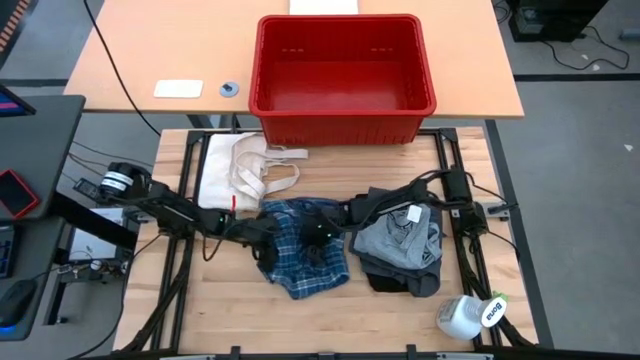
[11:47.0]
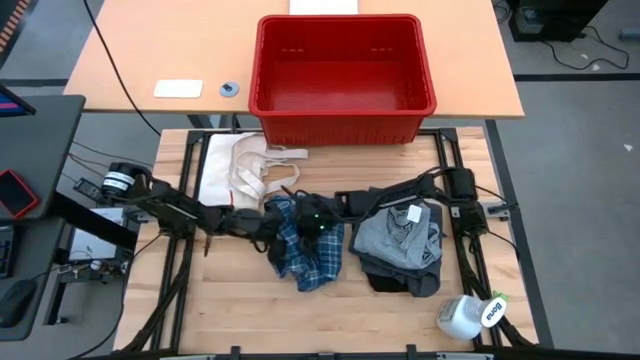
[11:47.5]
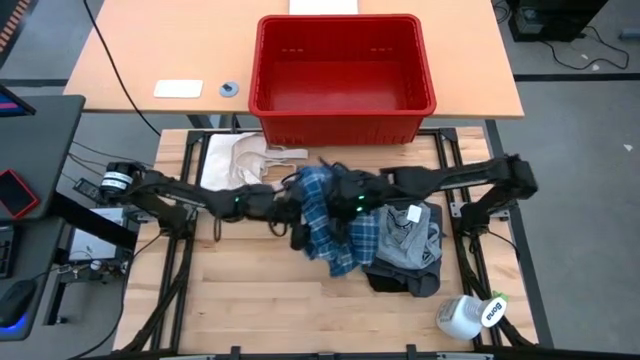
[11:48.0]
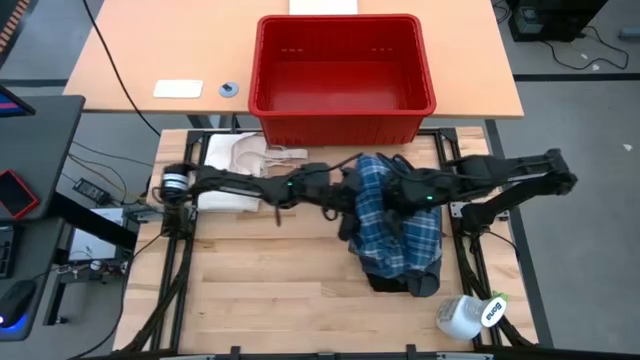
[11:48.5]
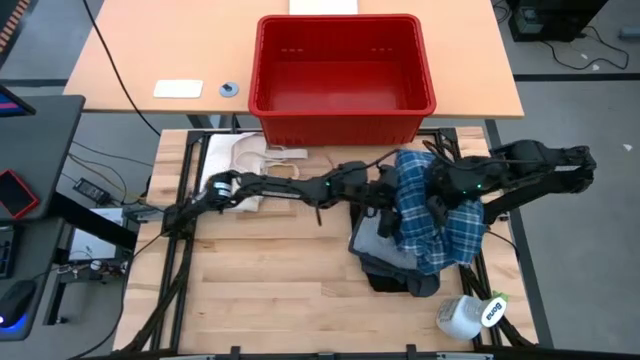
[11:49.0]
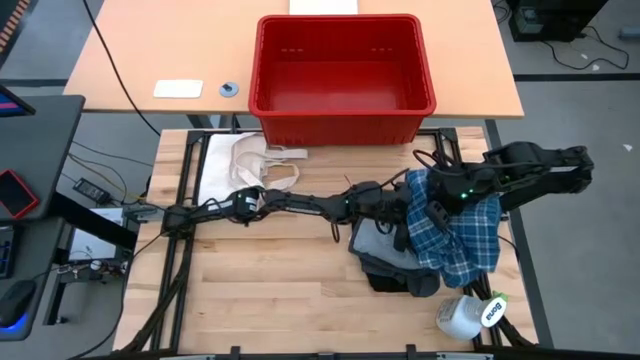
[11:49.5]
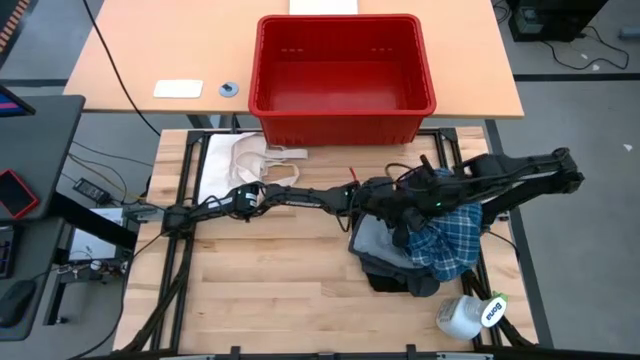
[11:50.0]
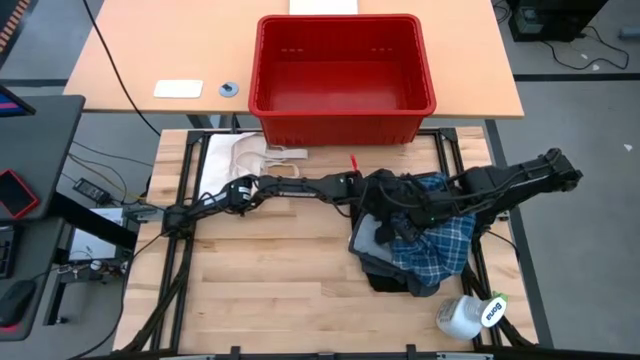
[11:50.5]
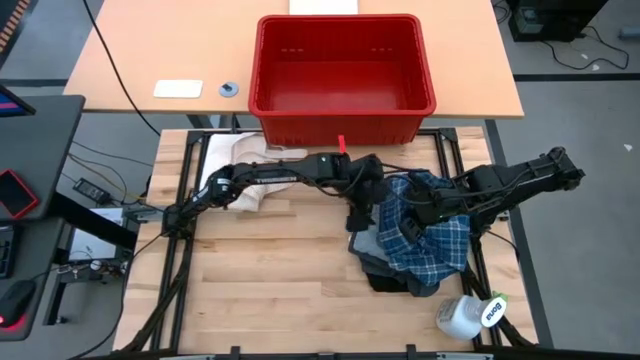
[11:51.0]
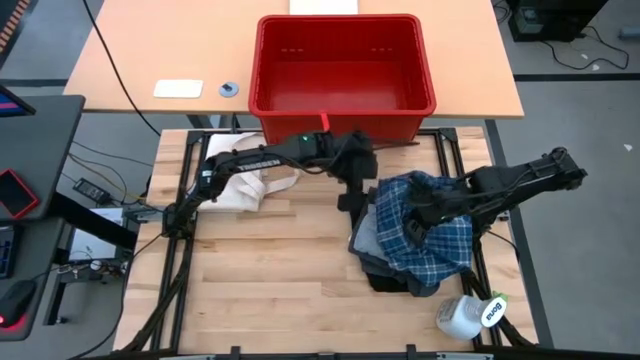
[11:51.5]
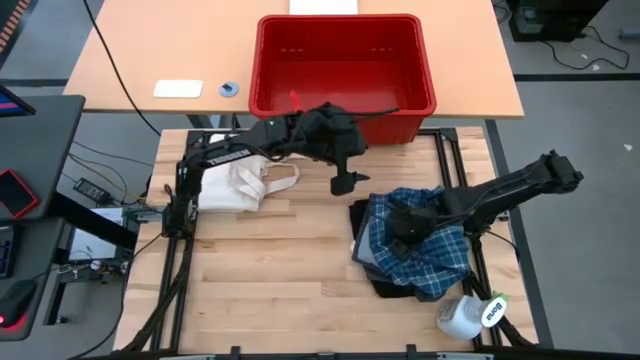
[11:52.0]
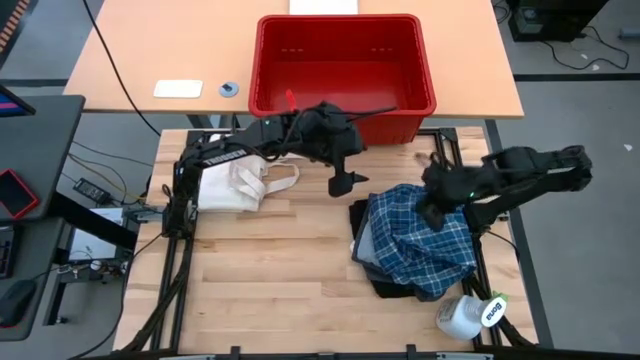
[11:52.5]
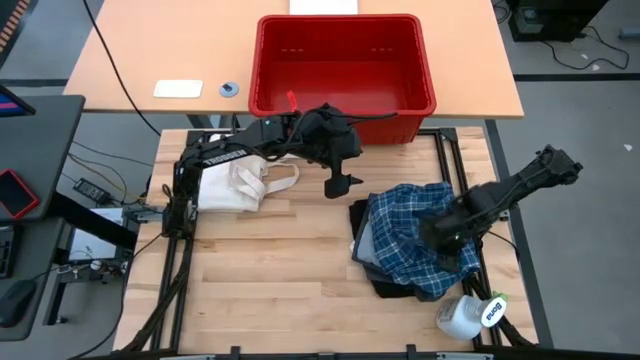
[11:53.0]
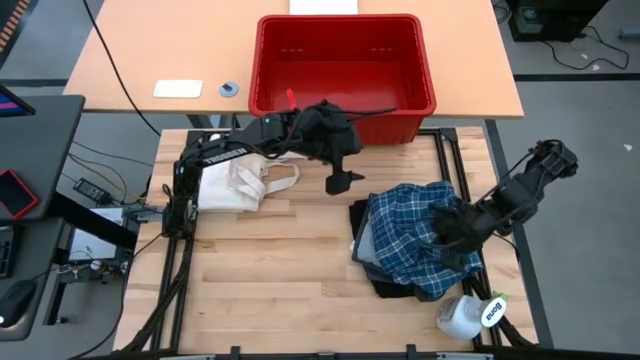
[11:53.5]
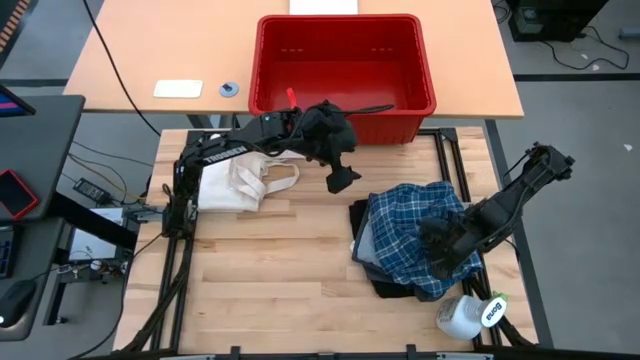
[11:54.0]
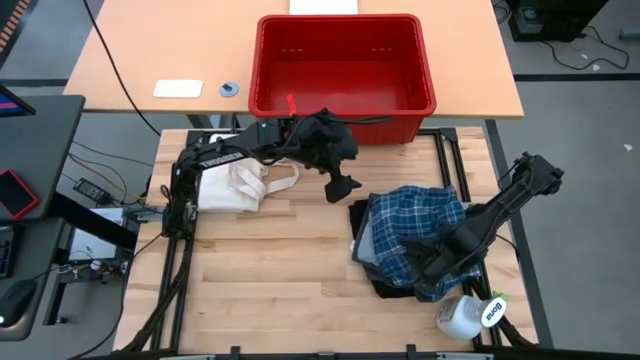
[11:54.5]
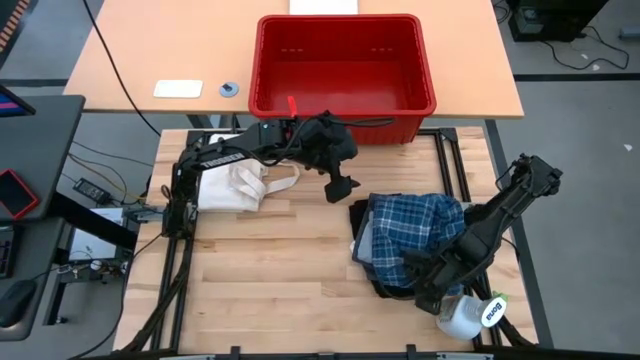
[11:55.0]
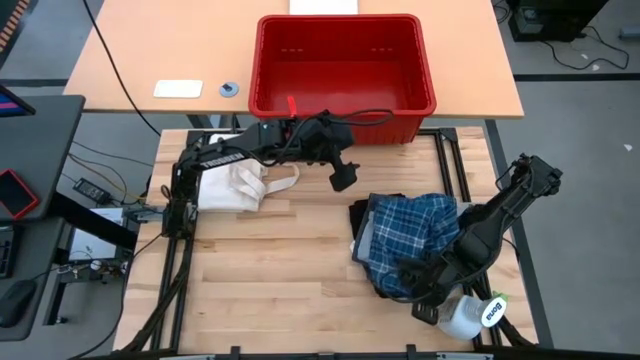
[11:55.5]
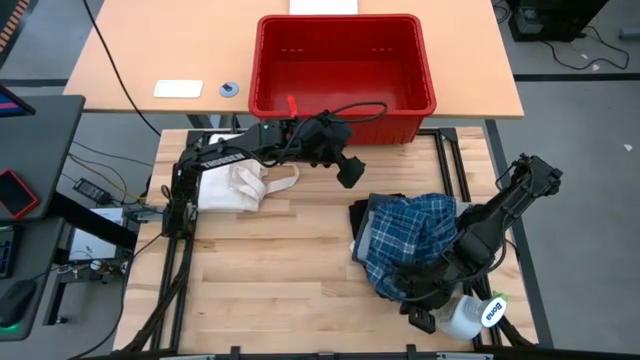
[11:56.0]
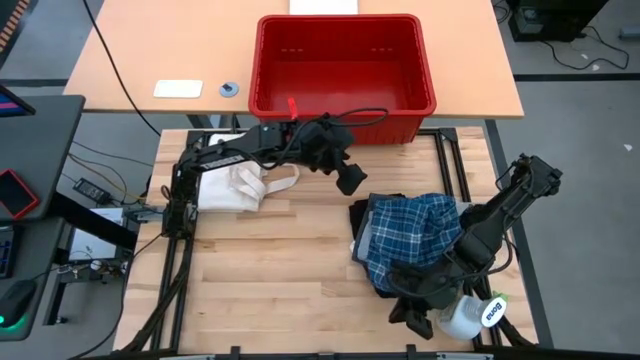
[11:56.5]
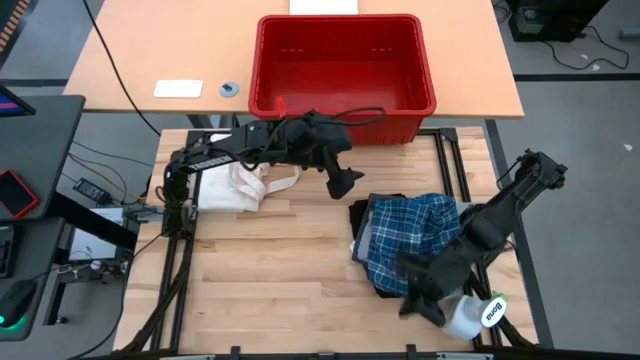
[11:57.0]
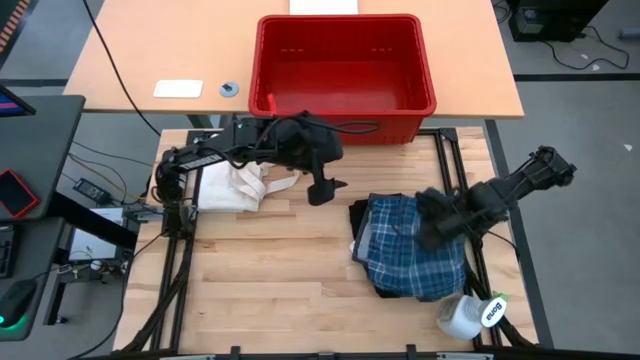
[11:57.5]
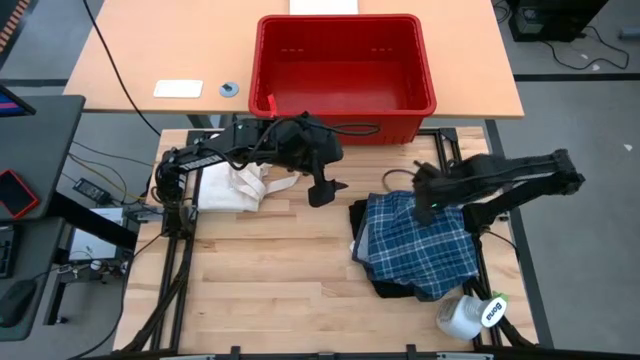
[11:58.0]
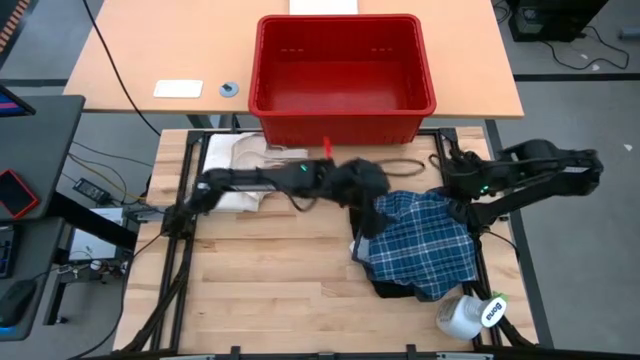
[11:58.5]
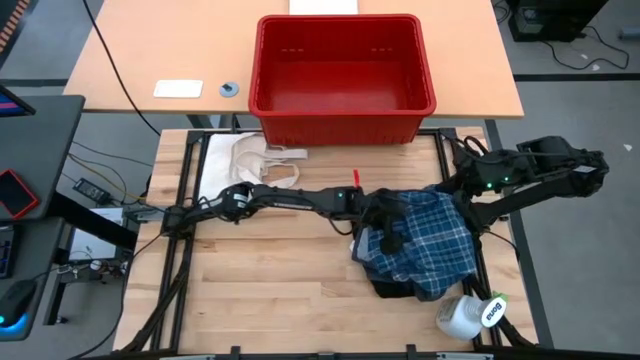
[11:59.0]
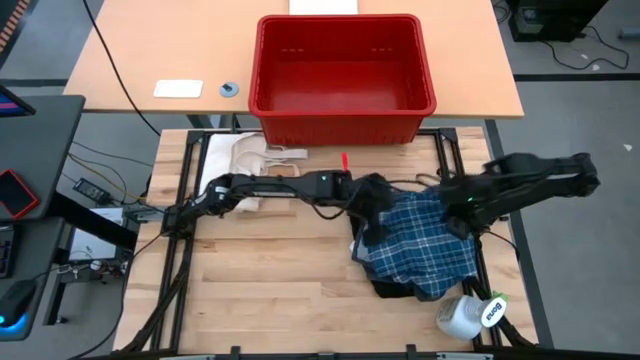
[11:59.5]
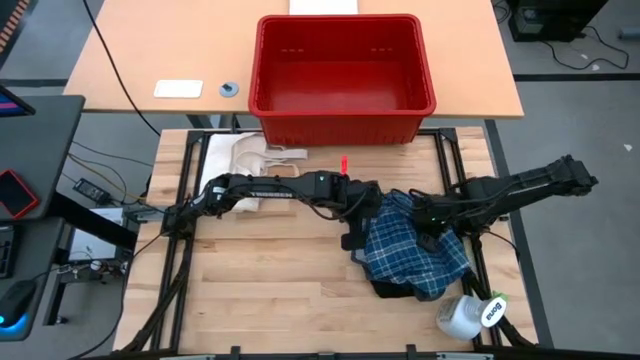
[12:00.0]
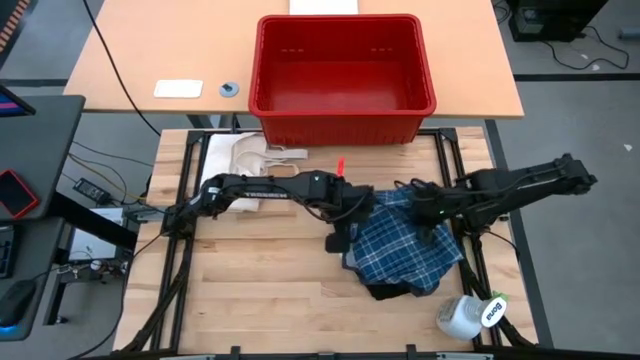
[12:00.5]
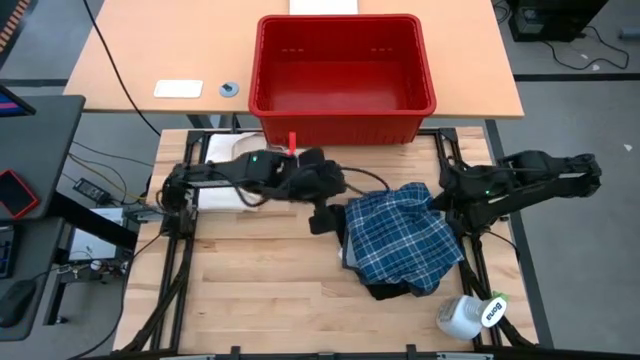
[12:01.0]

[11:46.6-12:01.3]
Task: Fold Laundry from Bin
Stack the folded blue checkered pants on top of the folded gray shirt

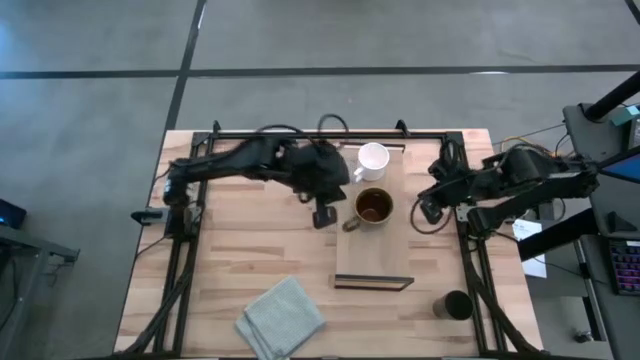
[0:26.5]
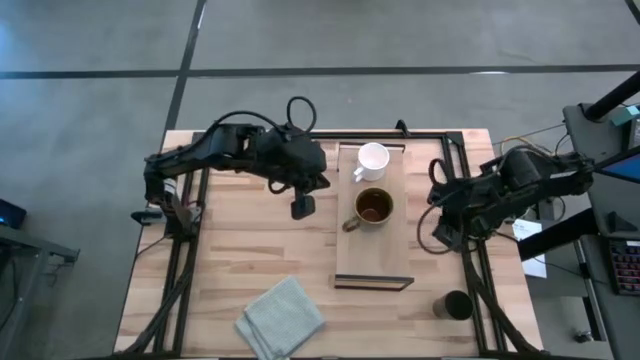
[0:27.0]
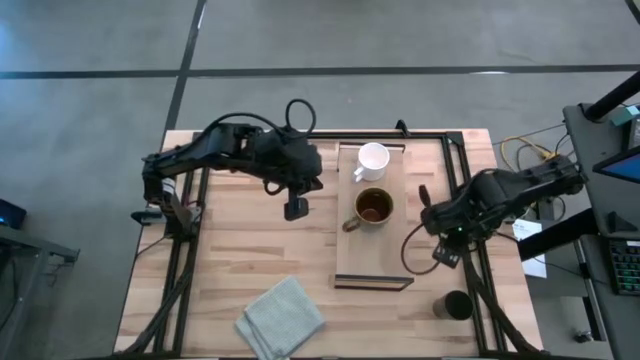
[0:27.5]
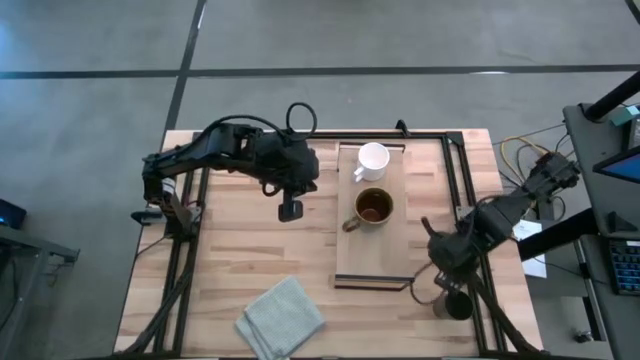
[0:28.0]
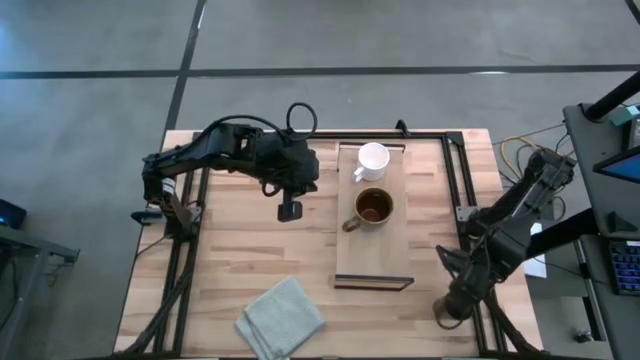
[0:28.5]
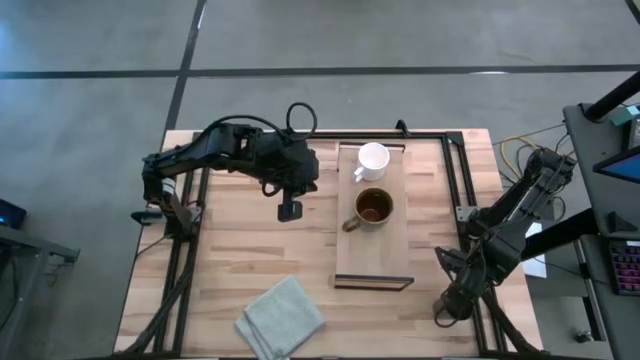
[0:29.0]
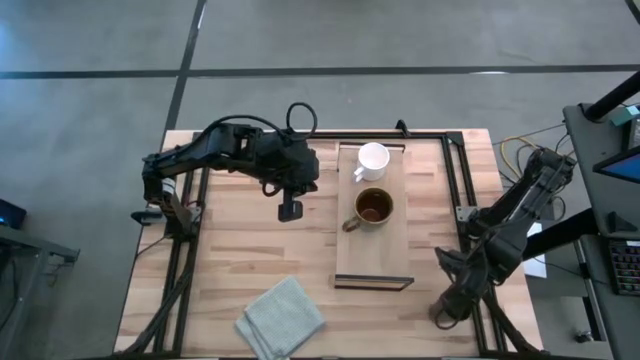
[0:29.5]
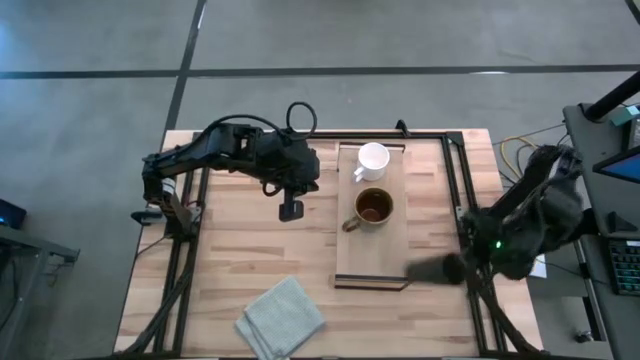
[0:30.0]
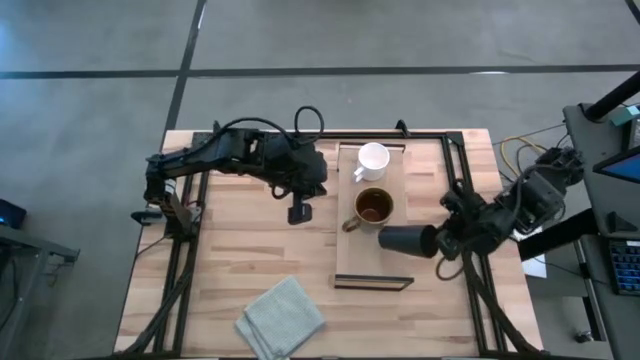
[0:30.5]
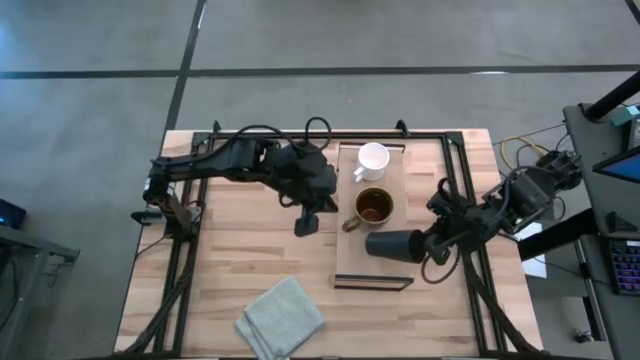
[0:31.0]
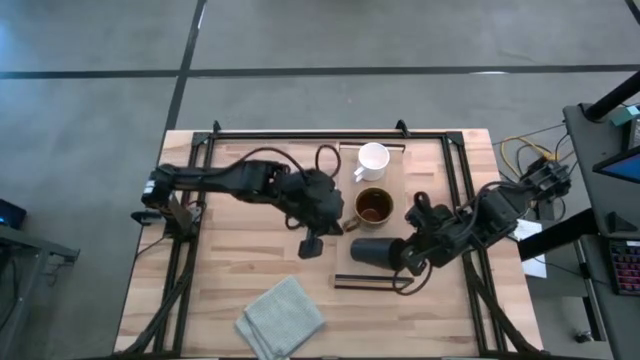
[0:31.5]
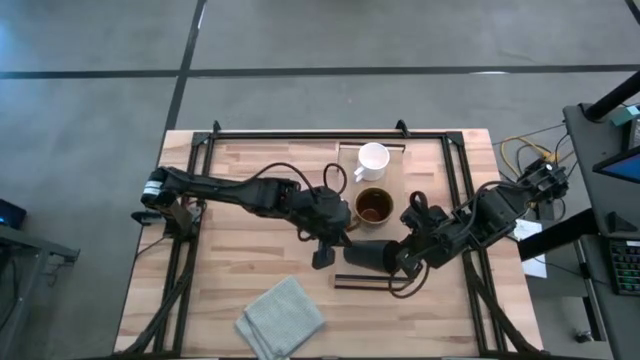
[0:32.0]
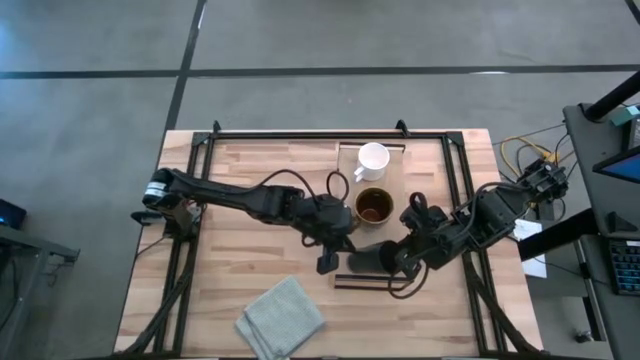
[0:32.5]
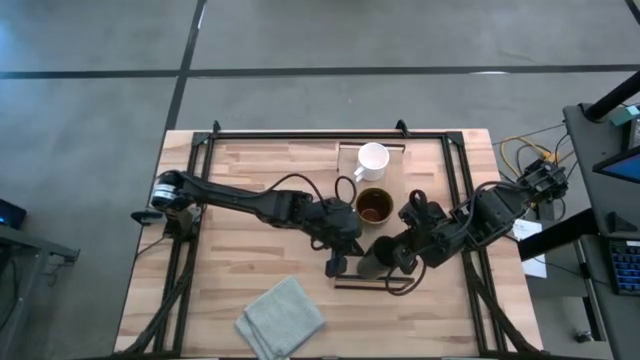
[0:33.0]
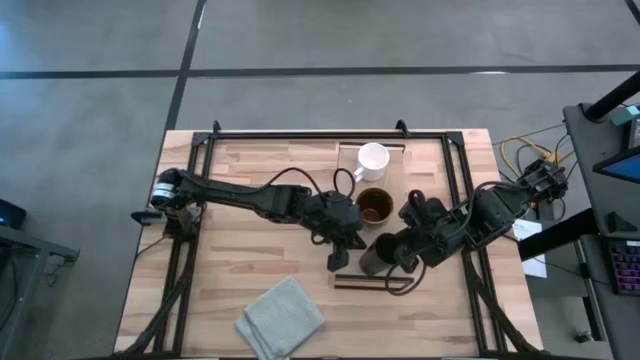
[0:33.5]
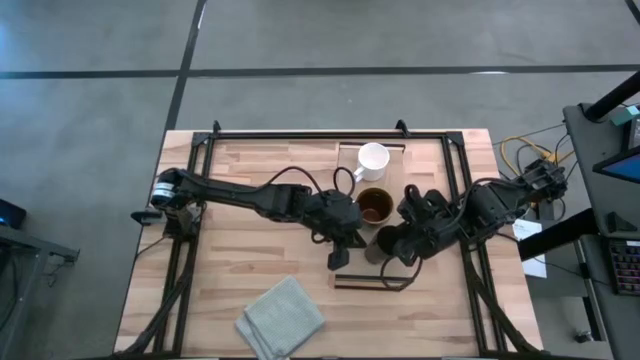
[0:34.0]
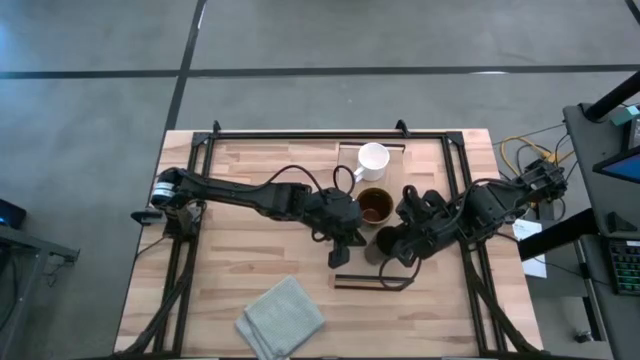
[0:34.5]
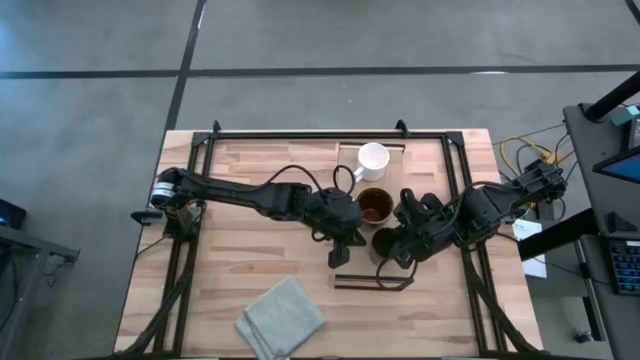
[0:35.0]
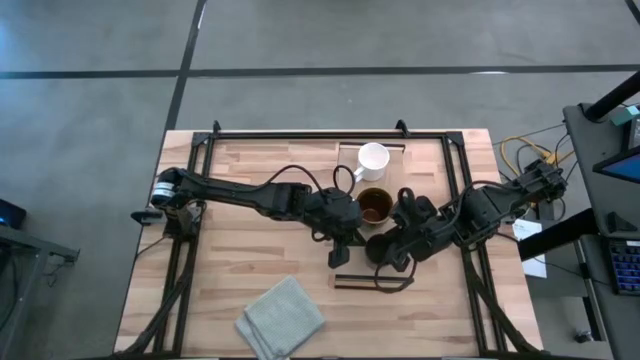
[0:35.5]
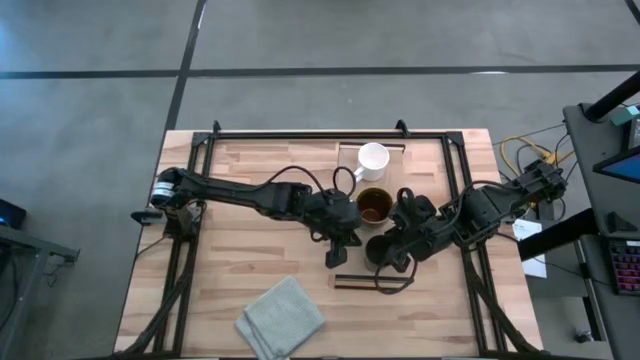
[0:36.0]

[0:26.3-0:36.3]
Task: Stack small to large cups/mugs on shelf
Put the black cup on the shelf
